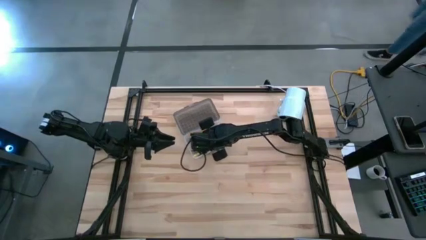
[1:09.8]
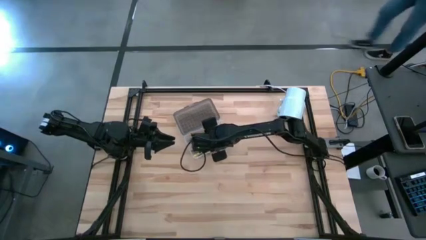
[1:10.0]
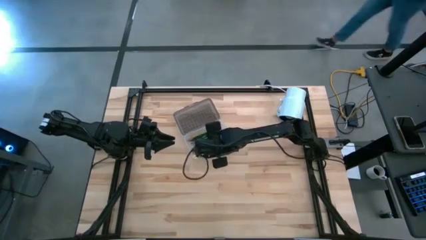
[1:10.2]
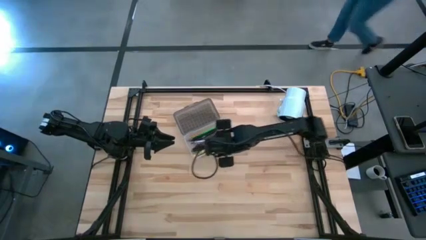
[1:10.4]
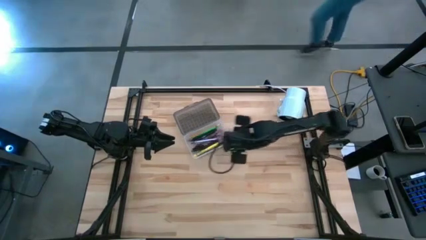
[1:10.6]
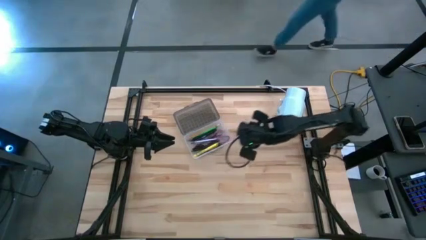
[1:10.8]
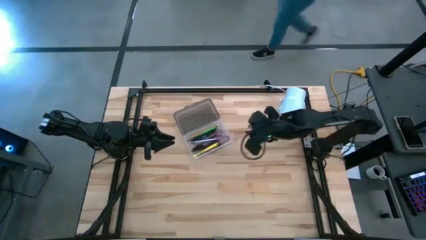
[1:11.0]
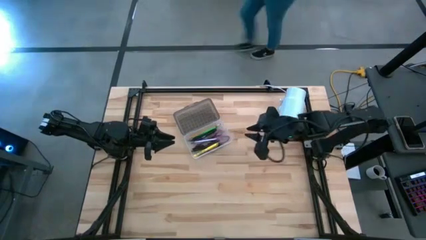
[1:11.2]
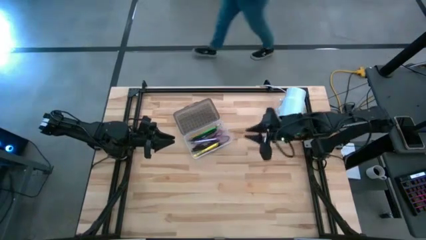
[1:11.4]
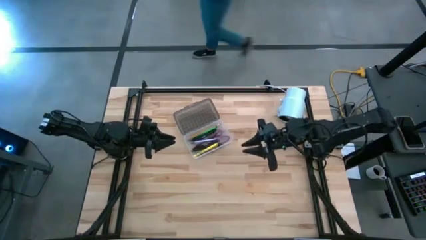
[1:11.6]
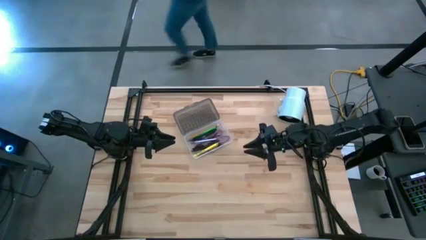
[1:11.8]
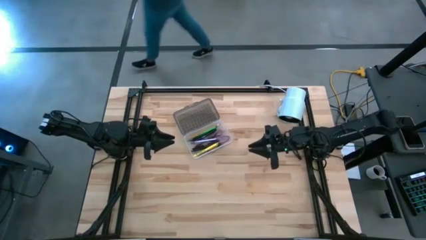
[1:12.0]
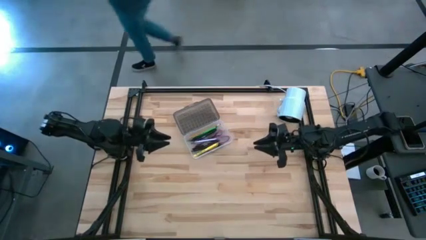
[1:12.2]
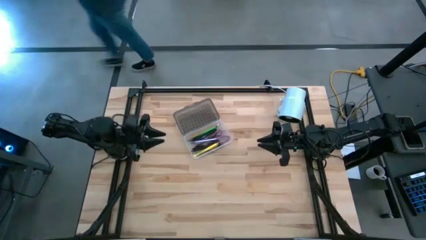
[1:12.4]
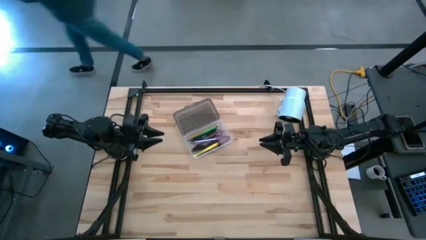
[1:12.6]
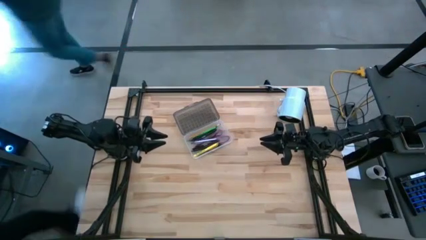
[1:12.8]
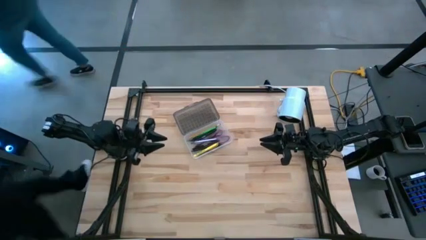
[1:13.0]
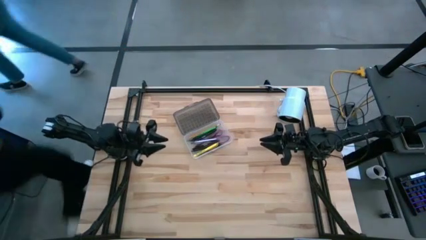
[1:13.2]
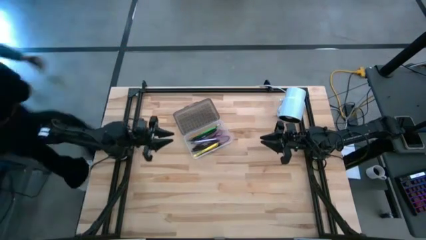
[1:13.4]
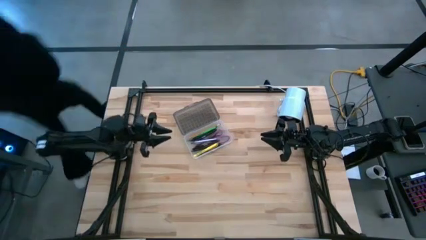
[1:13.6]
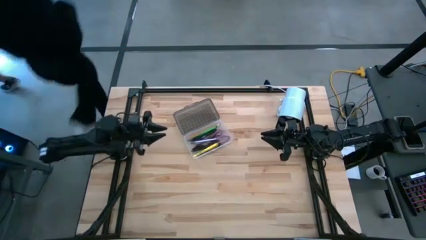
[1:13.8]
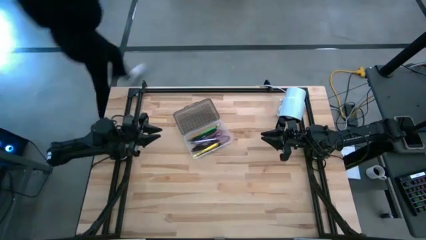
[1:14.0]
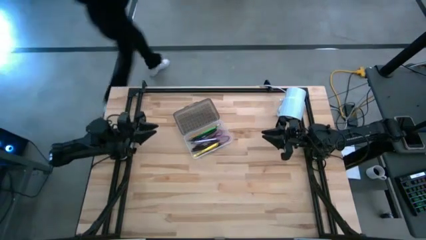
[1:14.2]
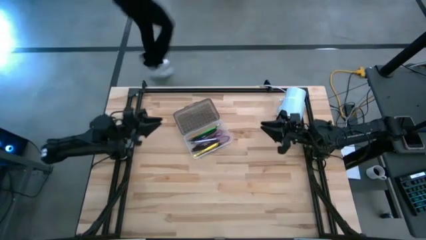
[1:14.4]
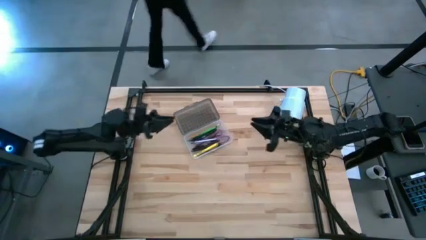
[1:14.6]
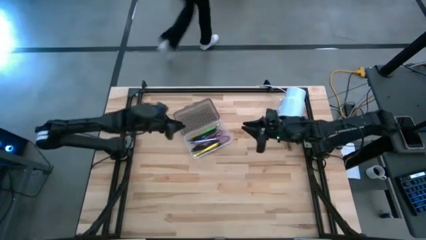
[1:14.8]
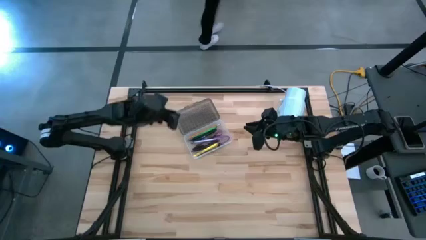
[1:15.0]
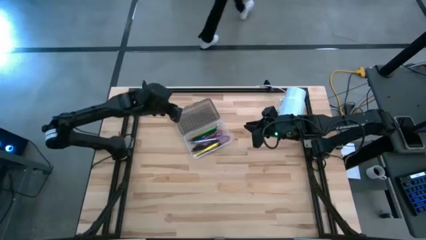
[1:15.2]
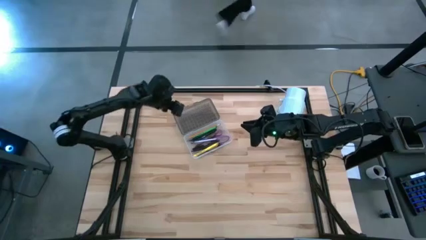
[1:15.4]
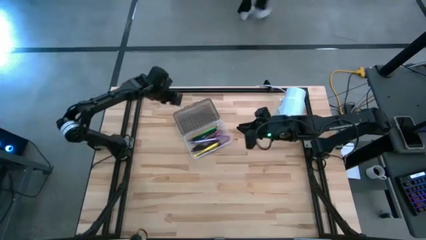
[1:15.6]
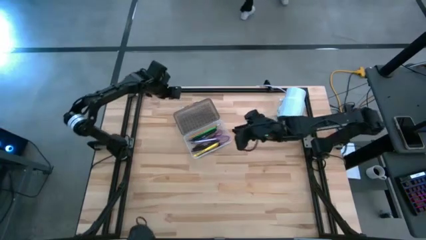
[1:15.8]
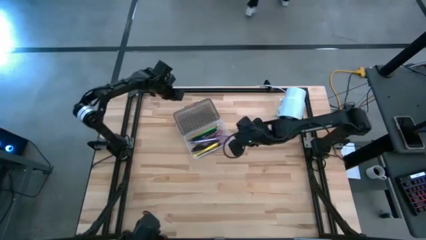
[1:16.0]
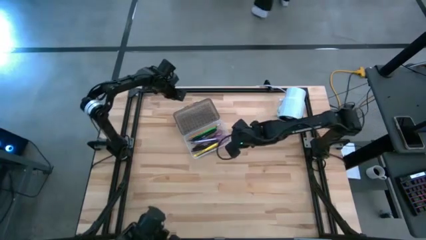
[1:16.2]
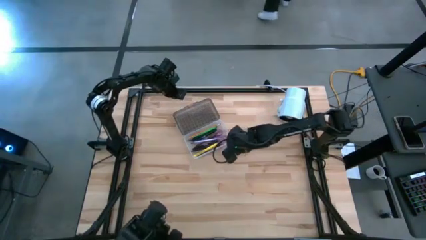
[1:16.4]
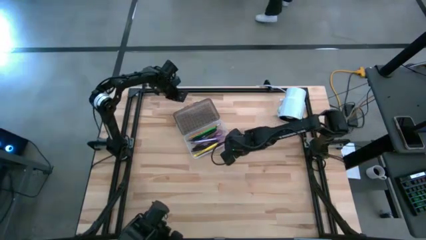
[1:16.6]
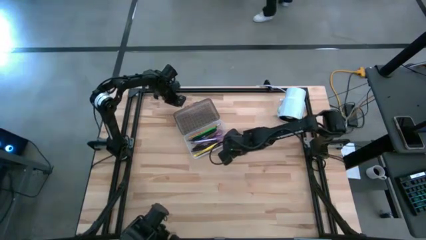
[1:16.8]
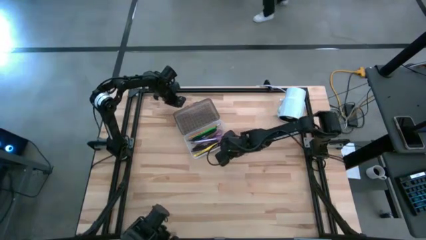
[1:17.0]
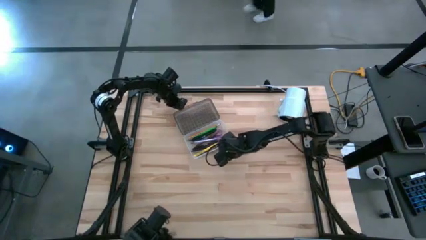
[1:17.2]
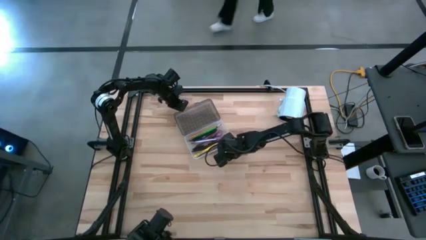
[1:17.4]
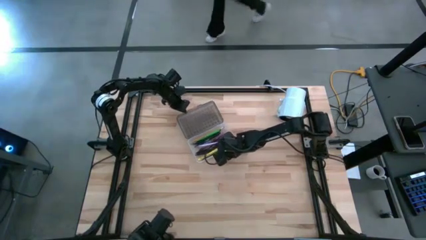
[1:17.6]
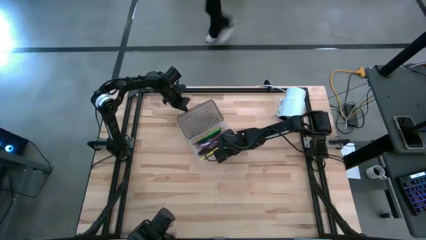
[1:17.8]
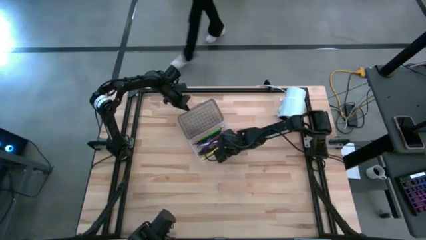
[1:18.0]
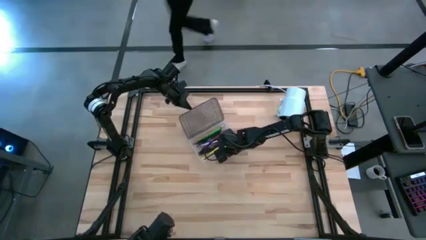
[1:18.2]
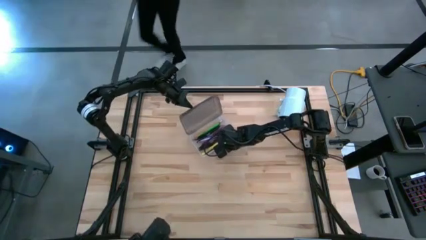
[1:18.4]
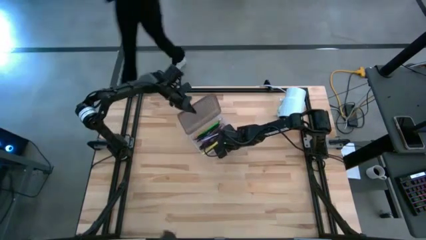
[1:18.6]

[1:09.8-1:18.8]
Task: Pick & place school supplies into a supply box
Close the black supply box

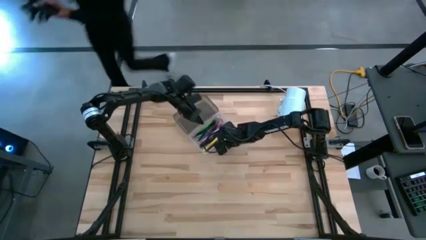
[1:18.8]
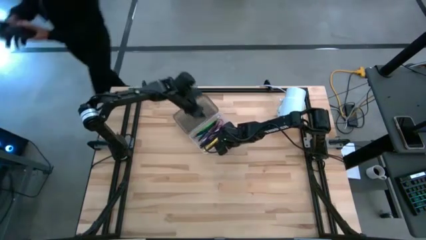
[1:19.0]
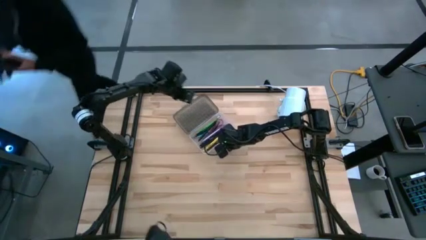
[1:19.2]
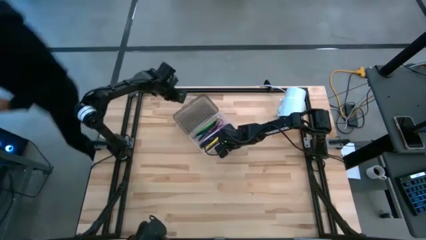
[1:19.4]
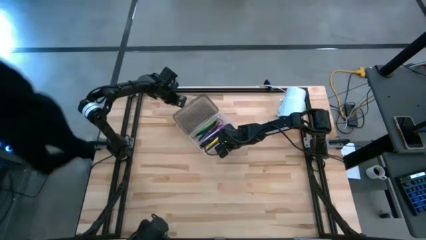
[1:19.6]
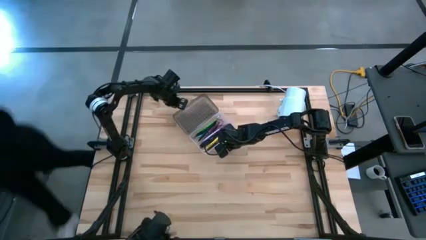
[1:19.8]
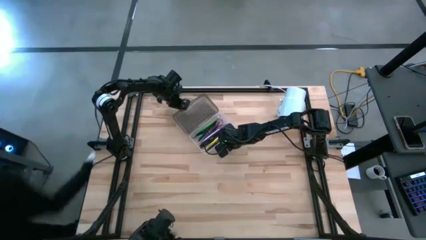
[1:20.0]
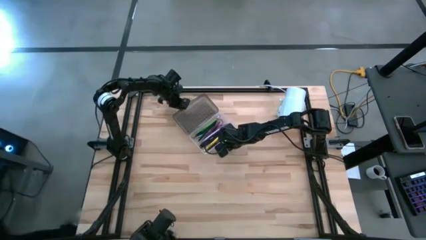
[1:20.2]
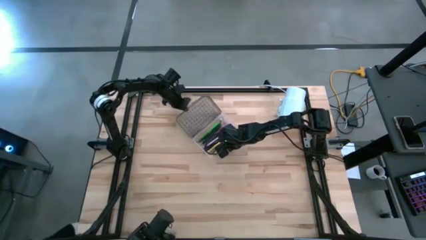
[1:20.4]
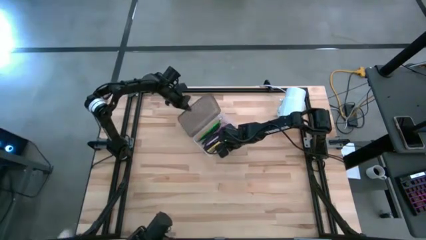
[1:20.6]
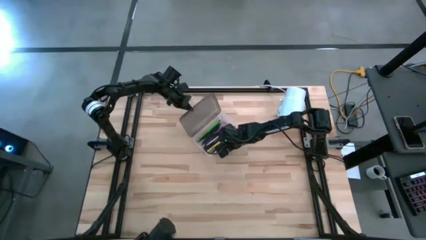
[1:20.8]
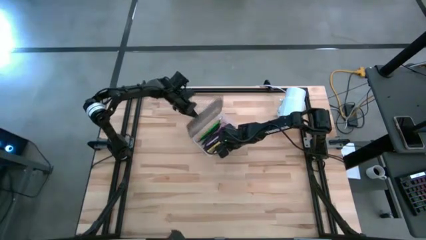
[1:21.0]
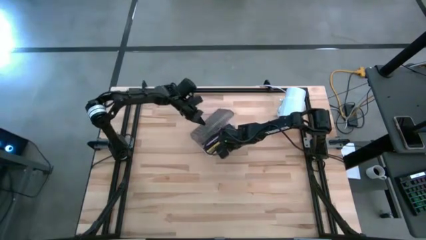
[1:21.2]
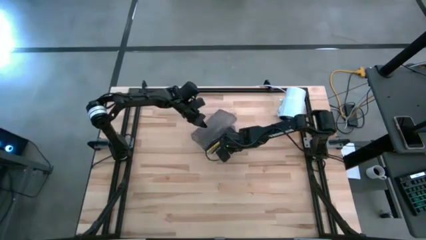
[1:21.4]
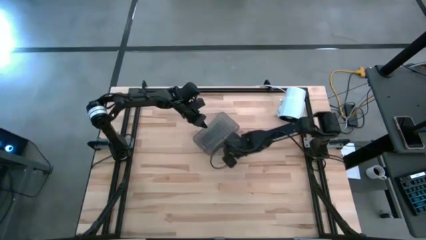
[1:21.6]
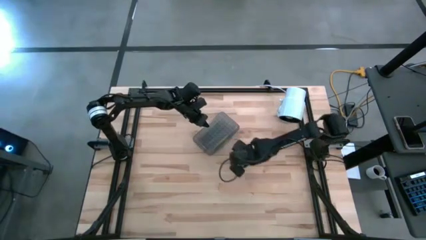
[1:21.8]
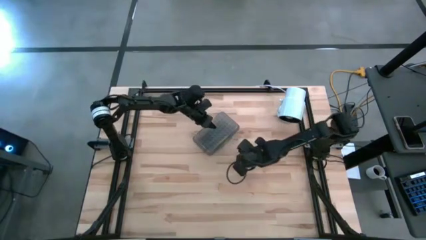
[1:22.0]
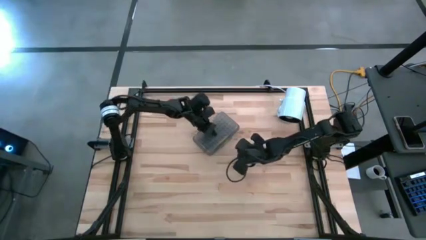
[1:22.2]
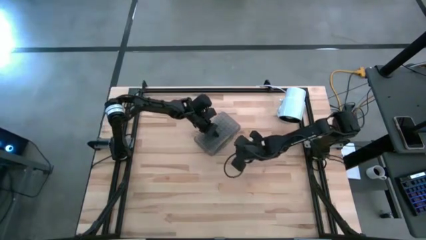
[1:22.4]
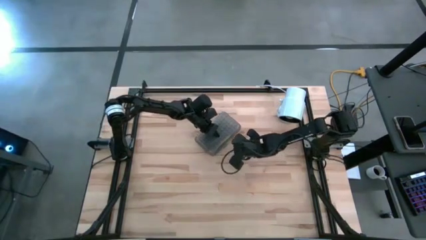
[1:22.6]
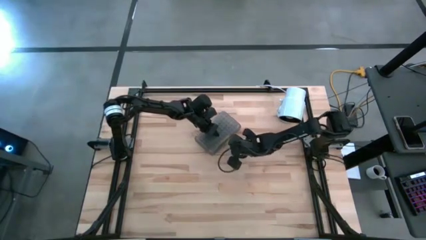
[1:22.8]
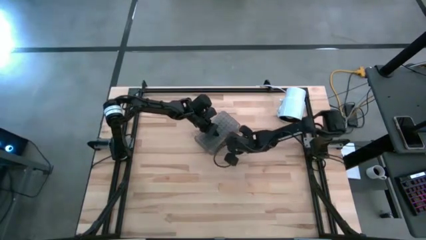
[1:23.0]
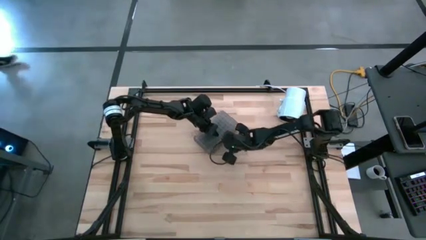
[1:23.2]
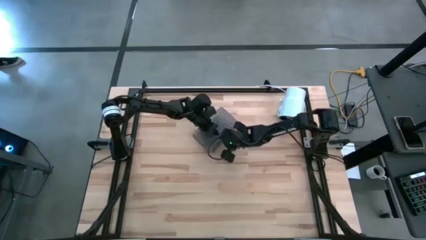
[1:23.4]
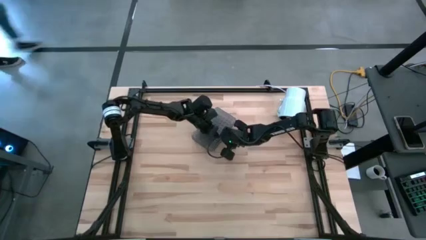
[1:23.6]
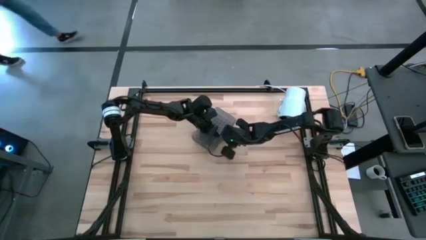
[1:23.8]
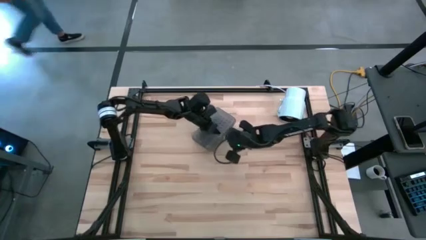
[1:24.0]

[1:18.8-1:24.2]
Close the black supply box

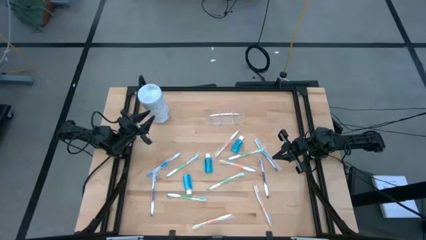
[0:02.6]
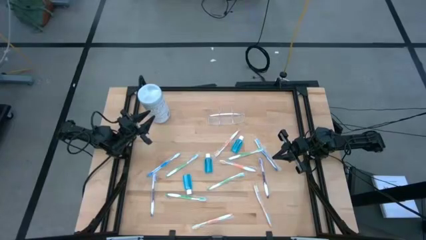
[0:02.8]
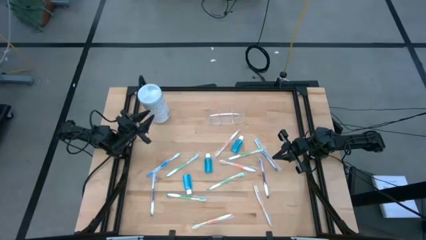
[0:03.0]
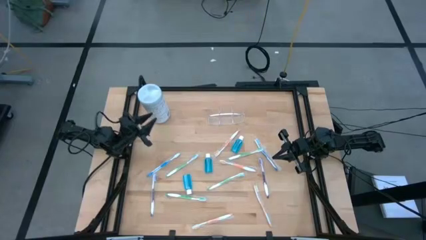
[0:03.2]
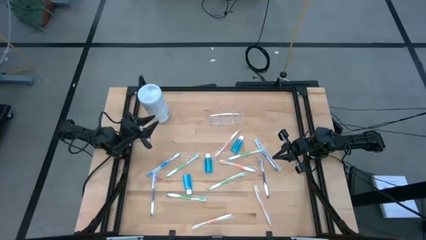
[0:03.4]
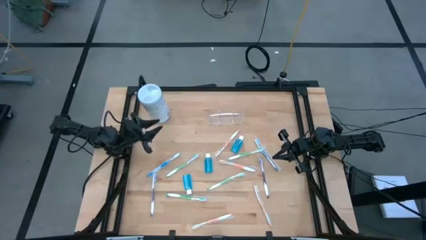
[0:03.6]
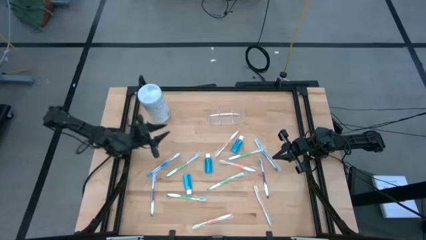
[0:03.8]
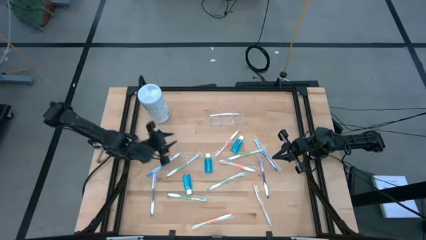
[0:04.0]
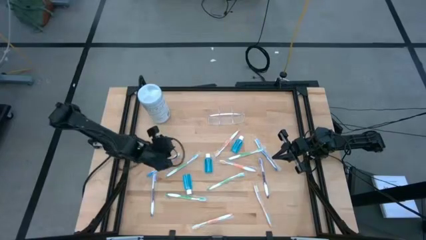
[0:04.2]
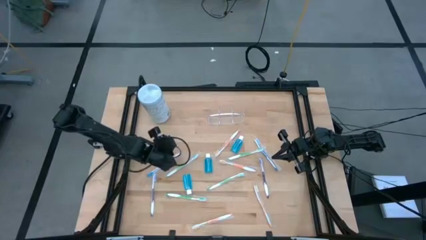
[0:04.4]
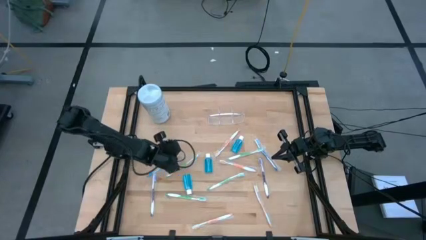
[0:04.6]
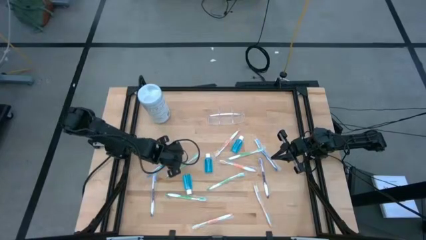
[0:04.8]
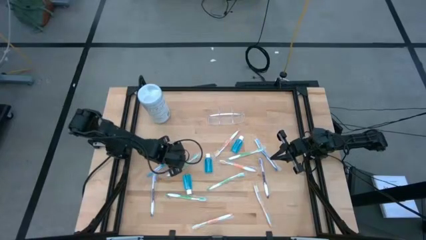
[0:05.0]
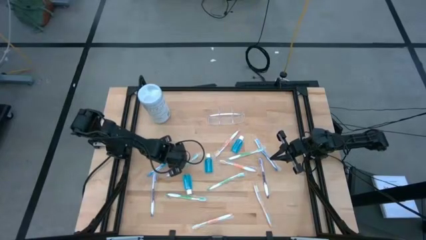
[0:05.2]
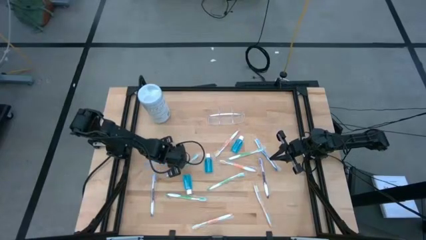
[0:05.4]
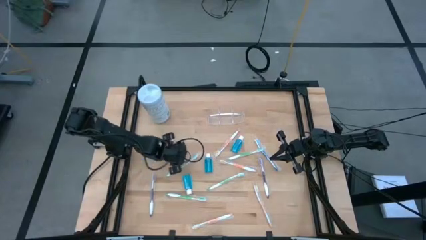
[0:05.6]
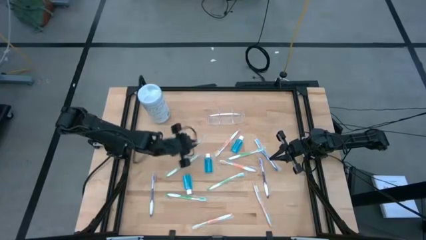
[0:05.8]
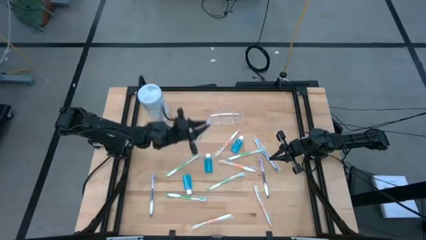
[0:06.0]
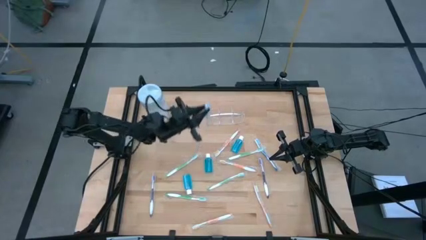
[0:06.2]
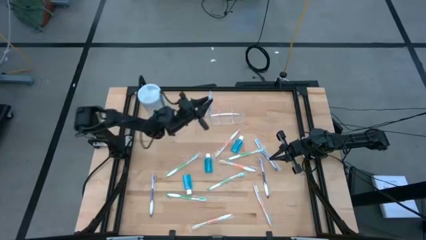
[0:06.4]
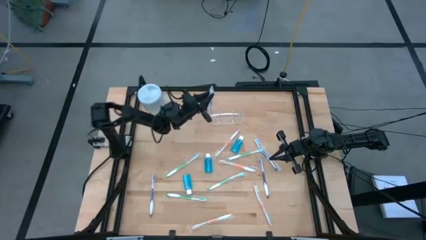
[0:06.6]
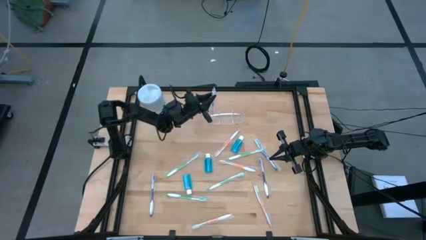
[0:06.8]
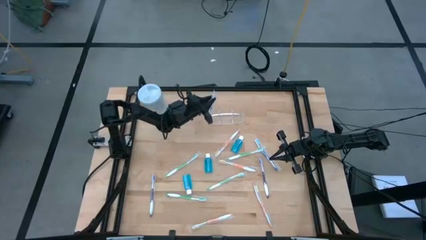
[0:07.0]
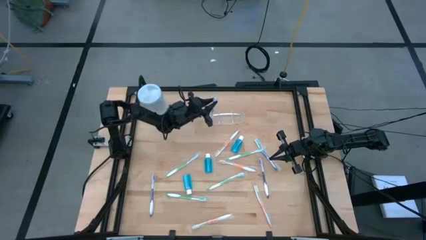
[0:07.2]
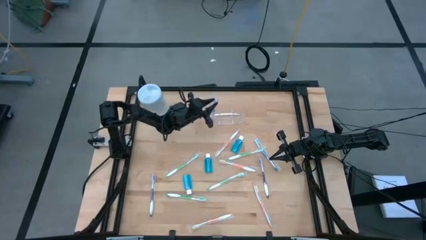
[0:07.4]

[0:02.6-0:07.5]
Task: Pick & Place toothbrushing station
Put the blue toothbrush into the transparent organizer
